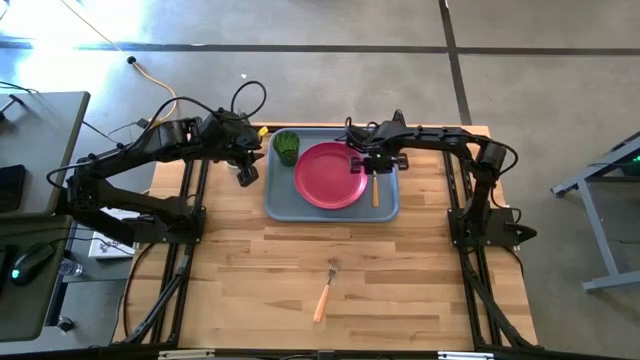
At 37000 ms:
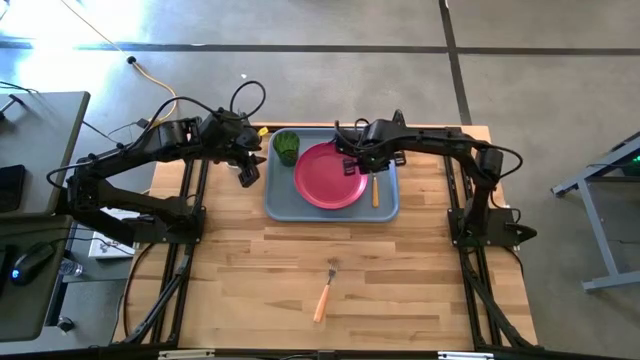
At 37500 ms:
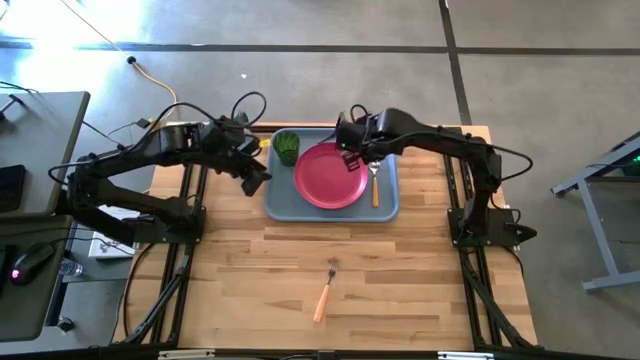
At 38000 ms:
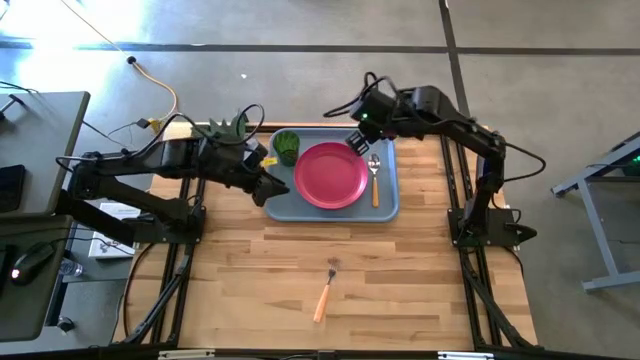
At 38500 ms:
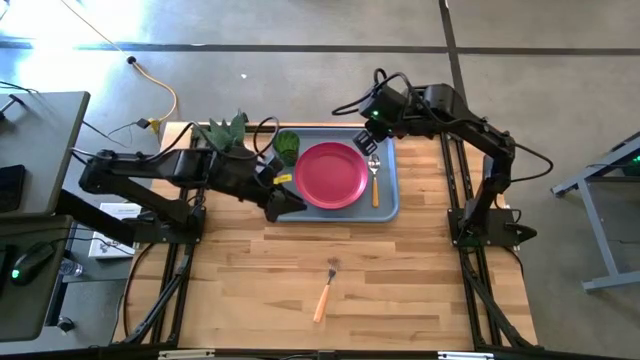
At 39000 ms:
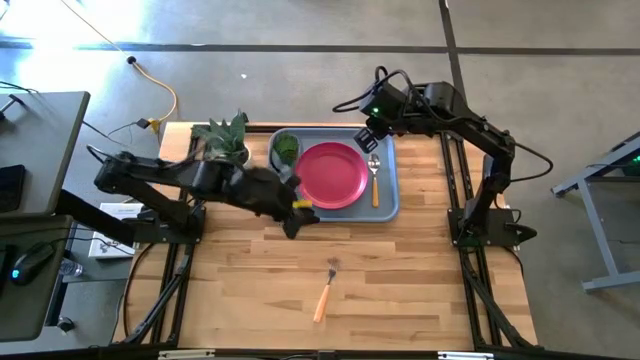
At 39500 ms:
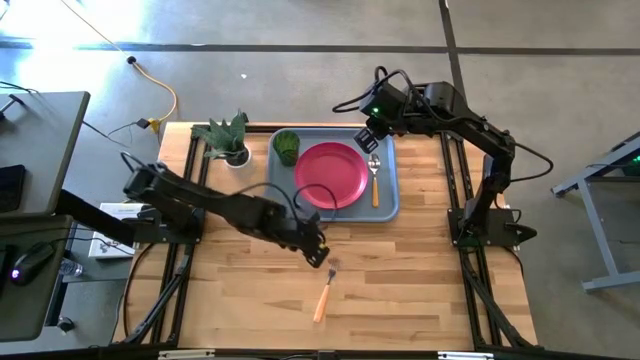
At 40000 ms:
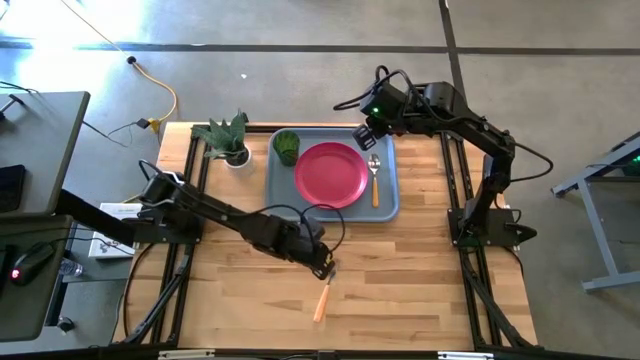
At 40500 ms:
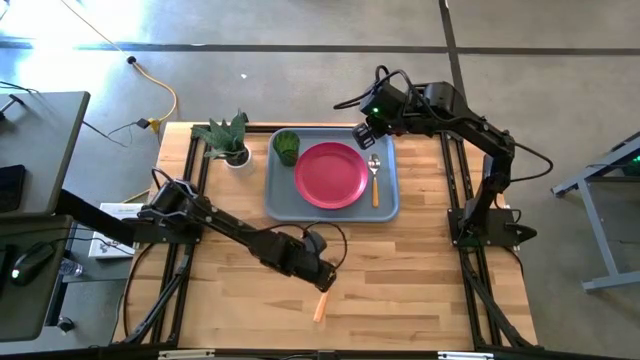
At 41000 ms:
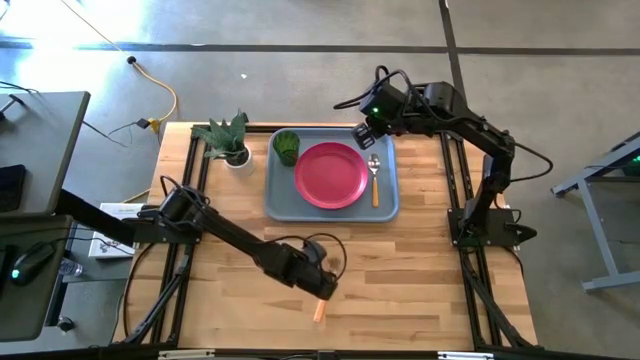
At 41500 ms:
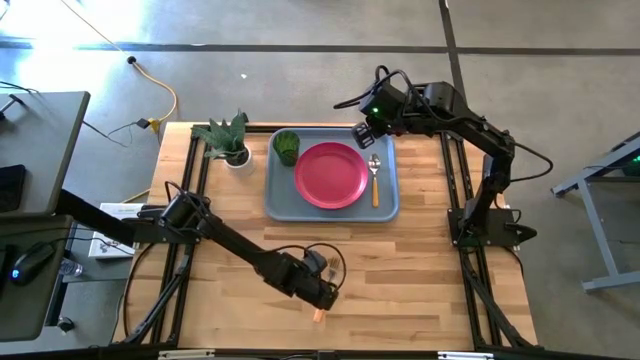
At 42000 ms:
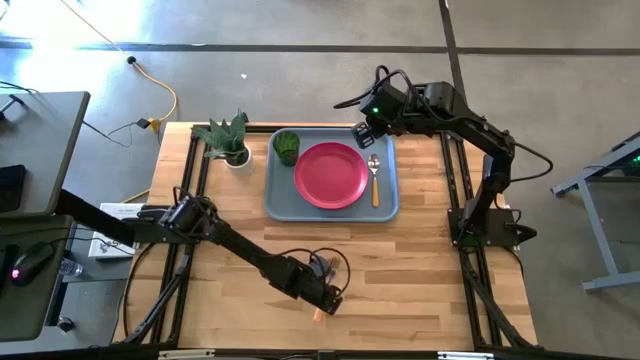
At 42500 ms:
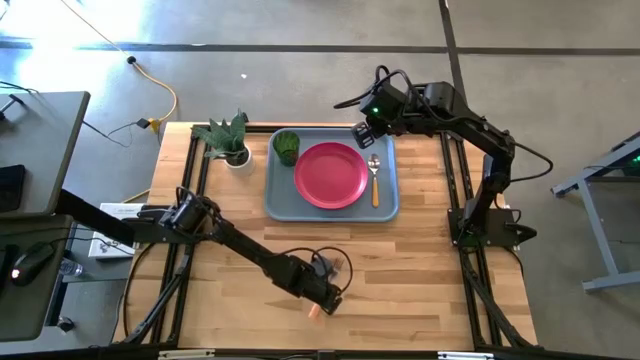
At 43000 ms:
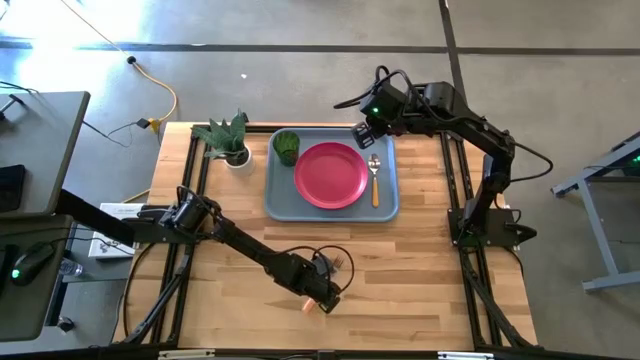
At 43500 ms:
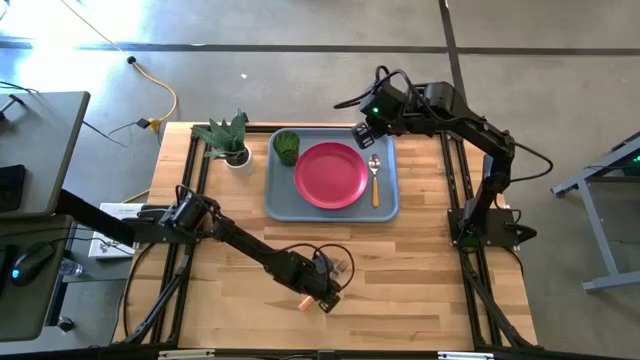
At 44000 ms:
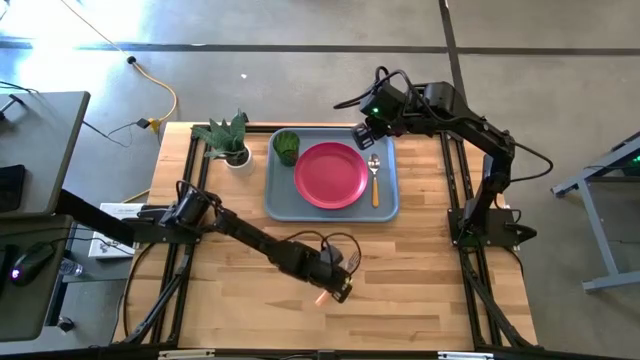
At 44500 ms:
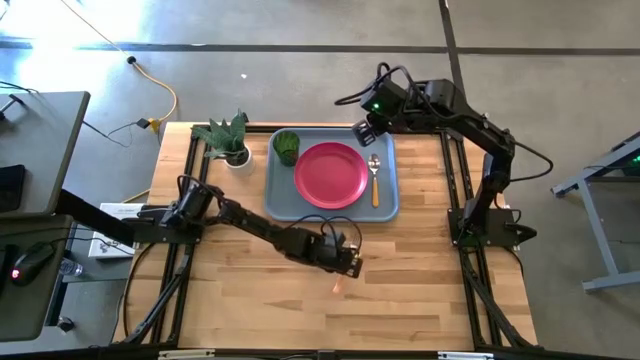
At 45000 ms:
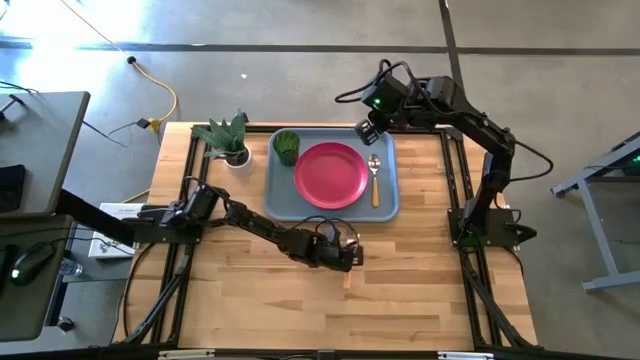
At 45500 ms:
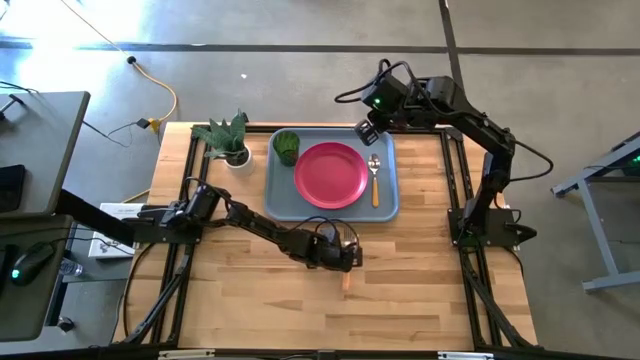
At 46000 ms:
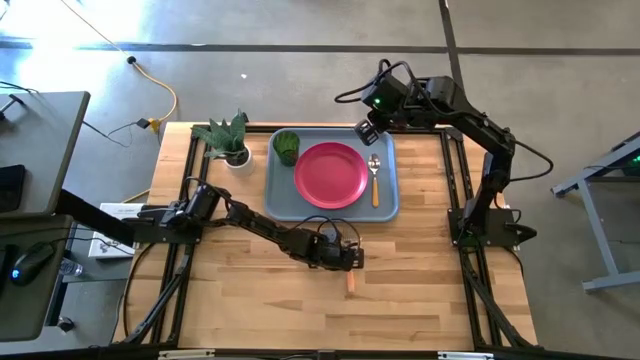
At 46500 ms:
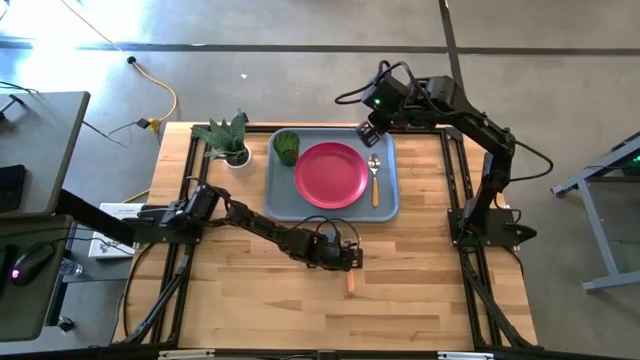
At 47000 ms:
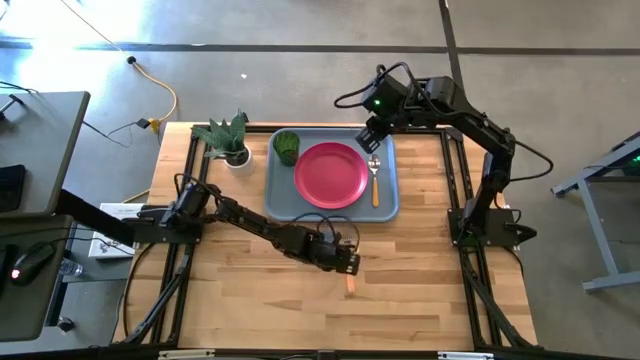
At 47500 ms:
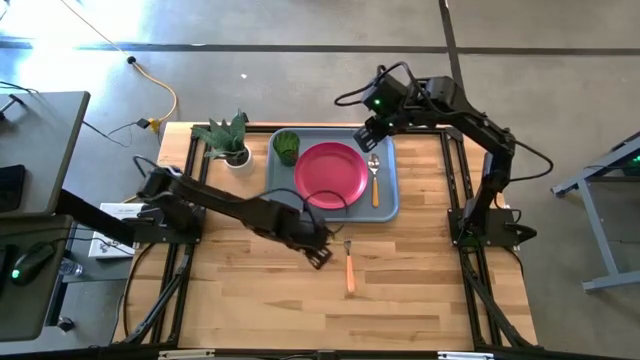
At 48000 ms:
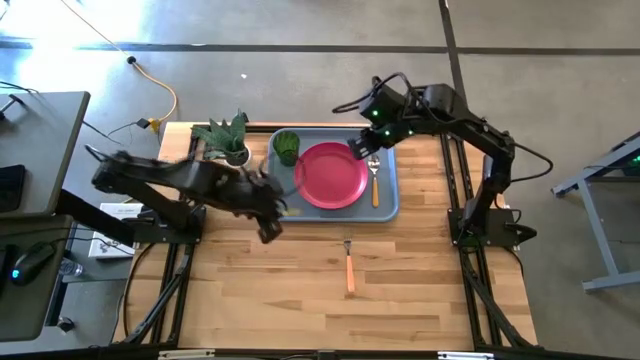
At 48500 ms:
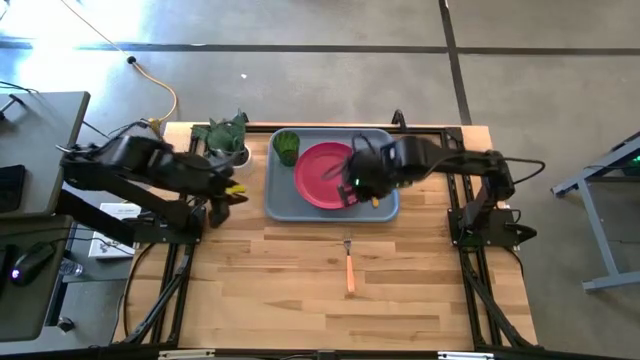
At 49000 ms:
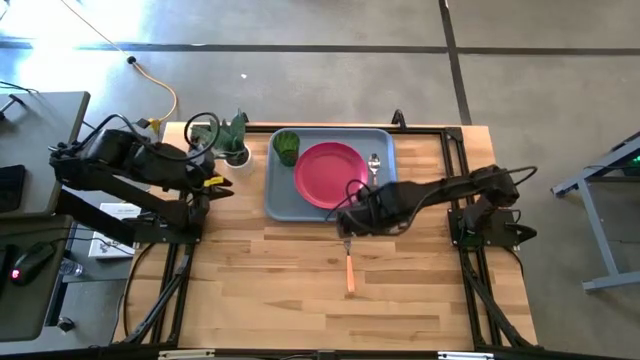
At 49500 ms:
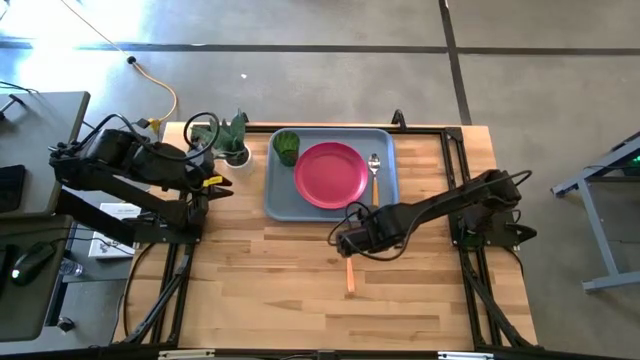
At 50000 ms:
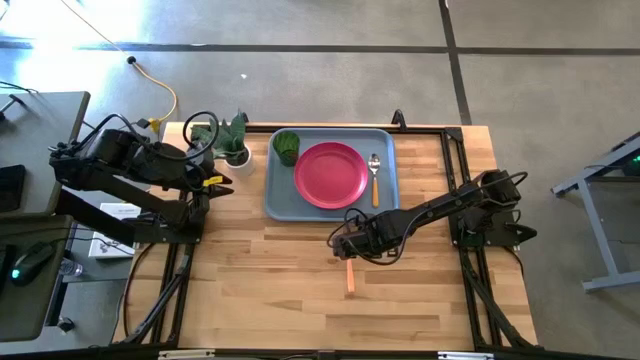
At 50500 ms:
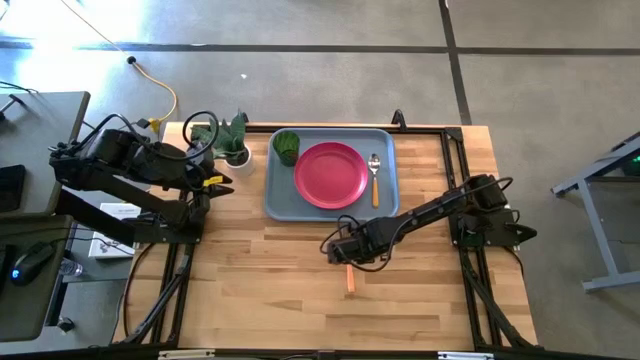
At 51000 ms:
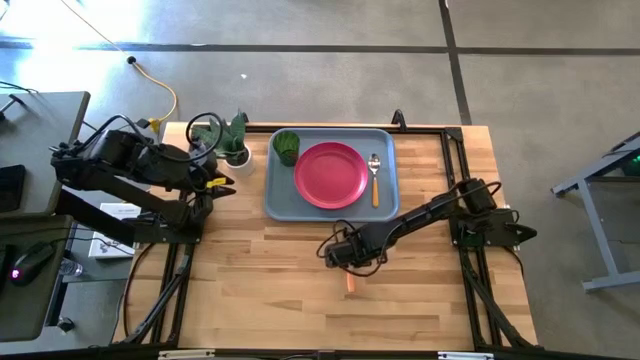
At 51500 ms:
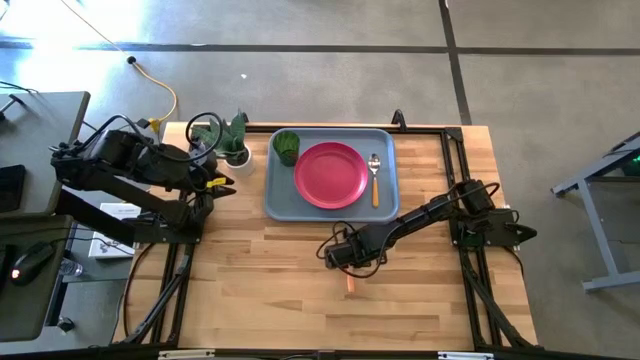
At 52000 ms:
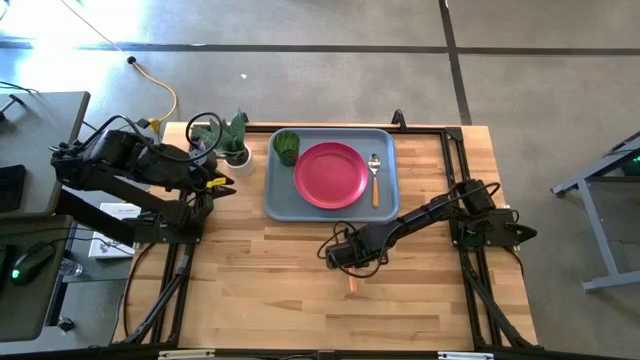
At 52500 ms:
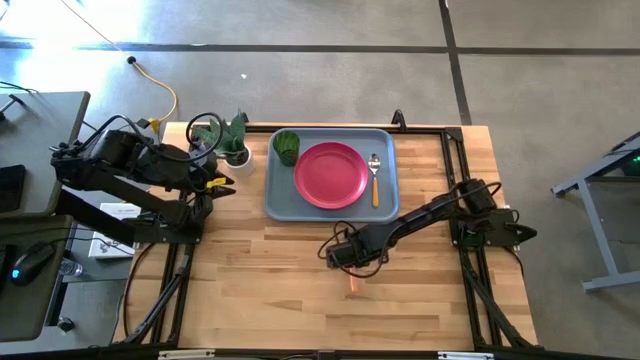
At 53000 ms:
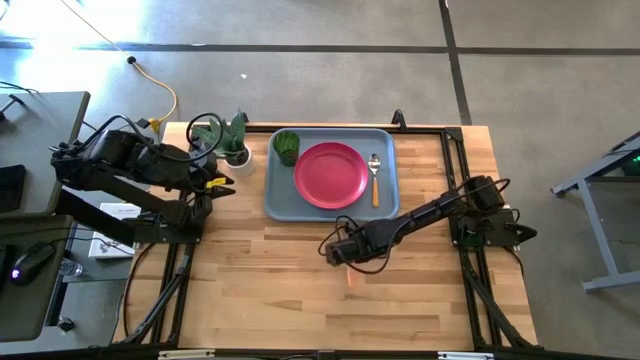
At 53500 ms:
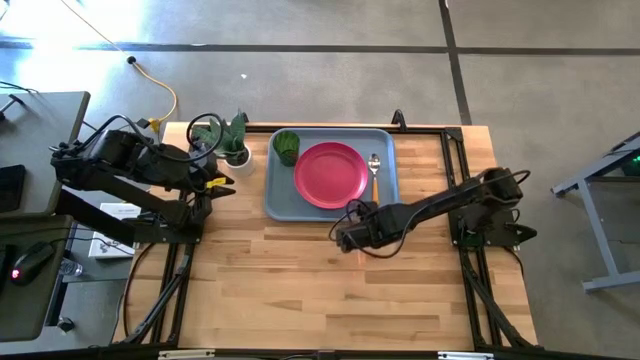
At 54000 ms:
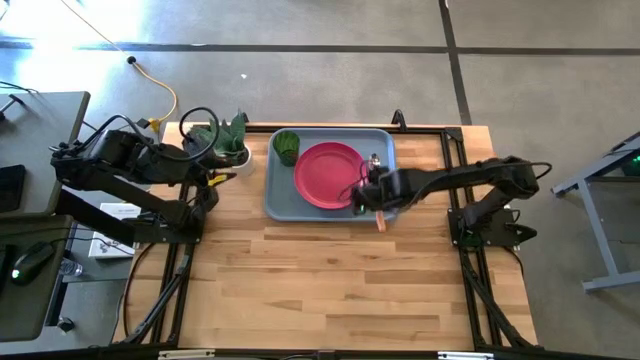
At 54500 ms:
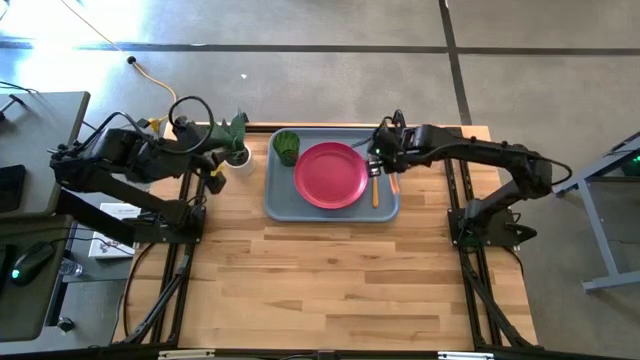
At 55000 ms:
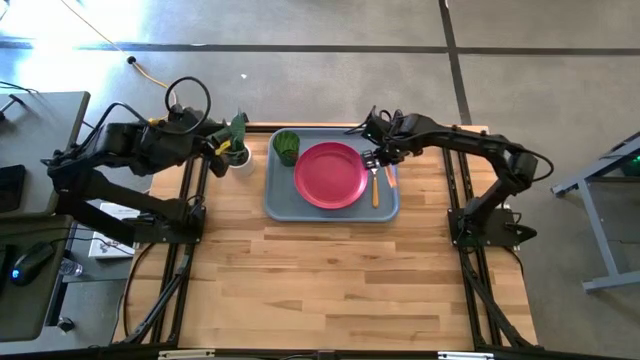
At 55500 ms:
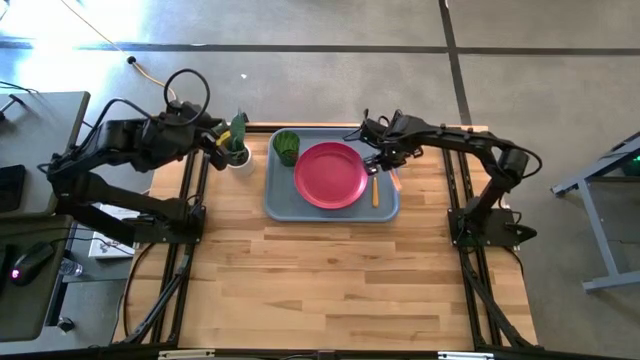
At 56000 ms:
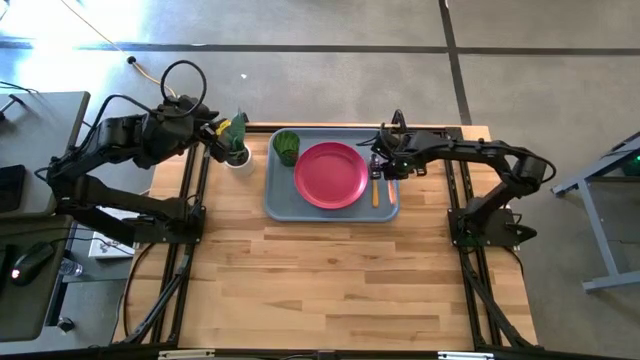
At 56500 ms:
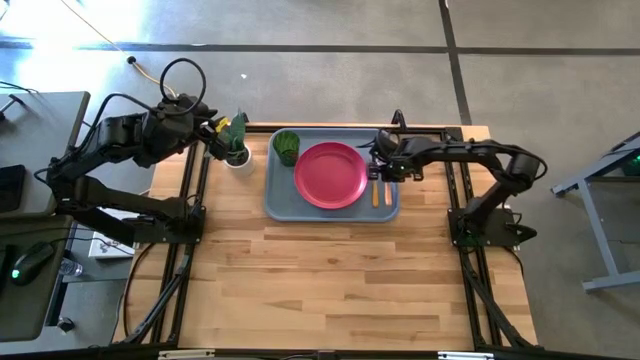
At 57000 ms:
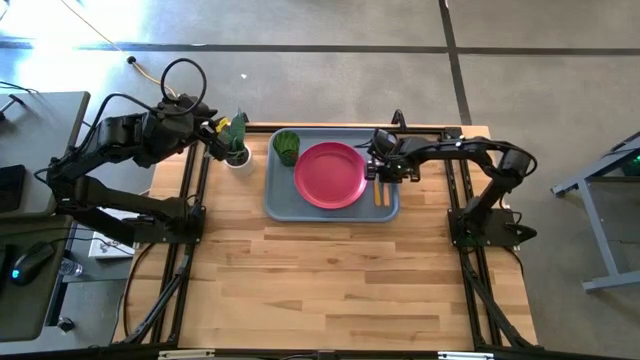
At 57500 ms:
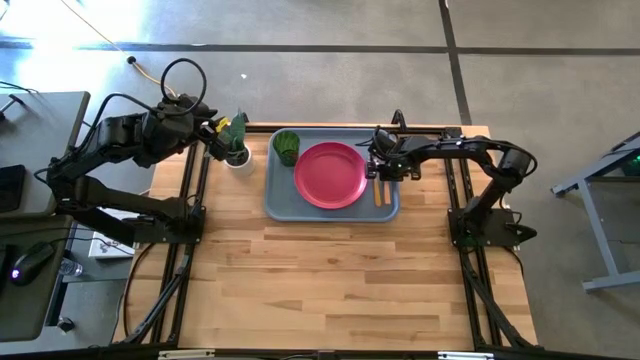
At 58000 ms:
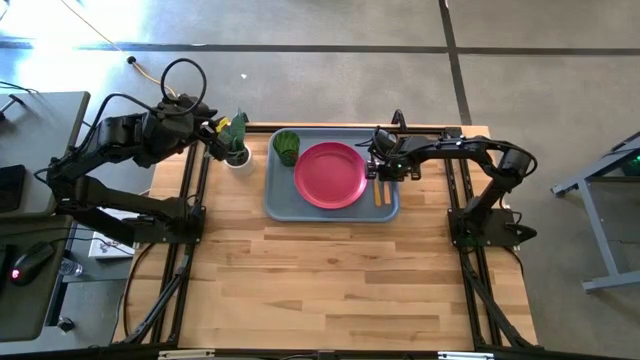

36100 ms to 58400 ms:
Task: Pick and place plate/cup/fork/spoon on tray
Put the orange fork on the gray tray
